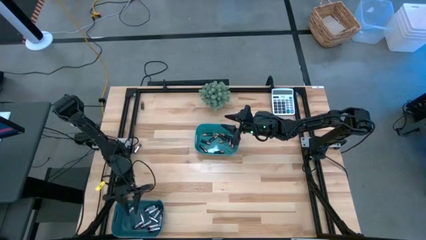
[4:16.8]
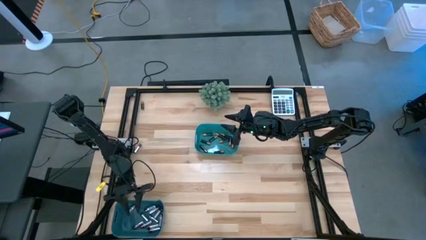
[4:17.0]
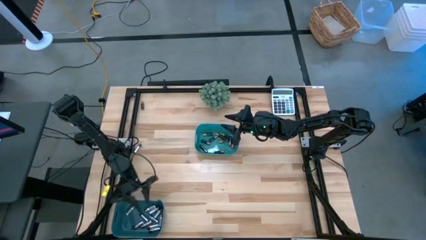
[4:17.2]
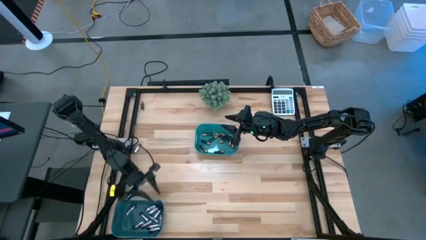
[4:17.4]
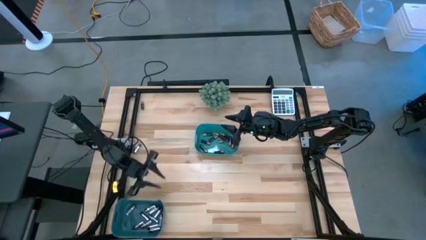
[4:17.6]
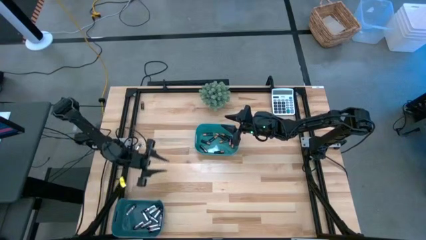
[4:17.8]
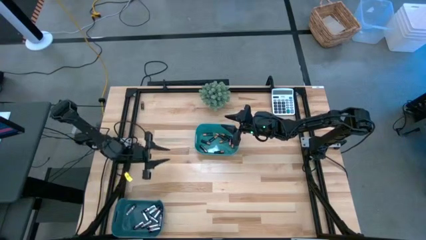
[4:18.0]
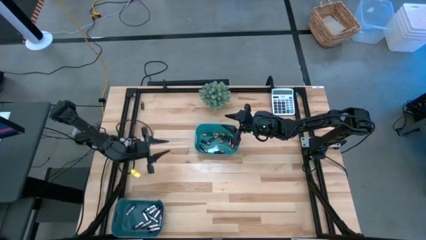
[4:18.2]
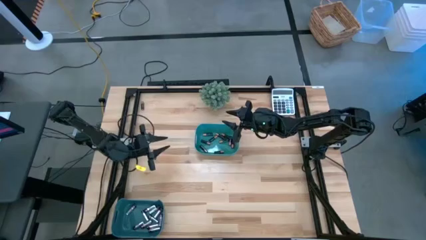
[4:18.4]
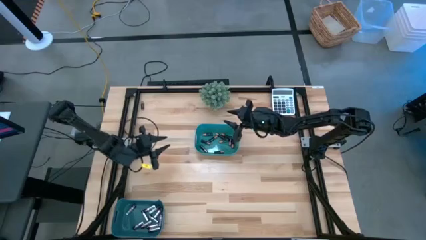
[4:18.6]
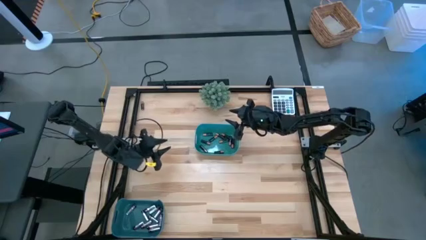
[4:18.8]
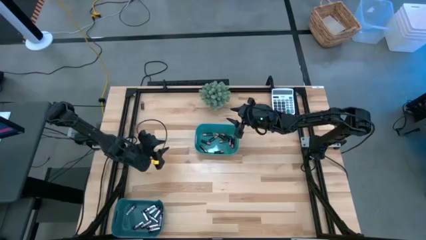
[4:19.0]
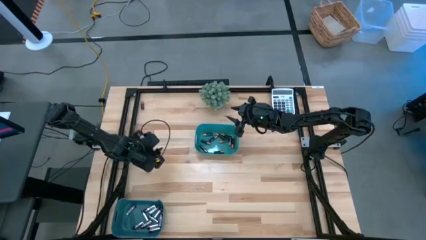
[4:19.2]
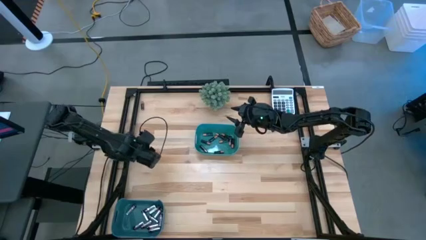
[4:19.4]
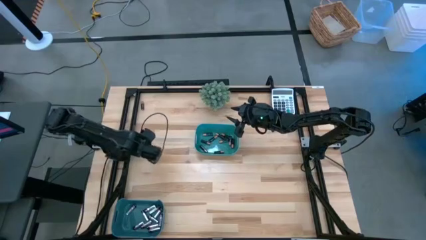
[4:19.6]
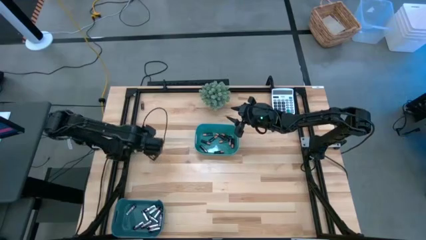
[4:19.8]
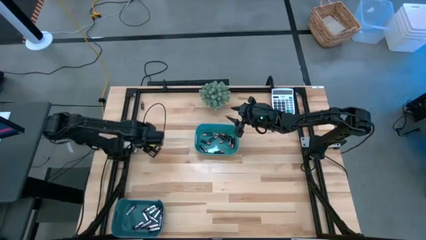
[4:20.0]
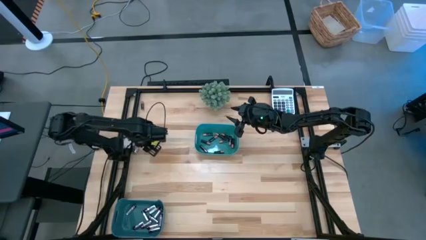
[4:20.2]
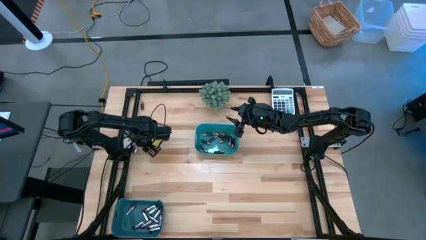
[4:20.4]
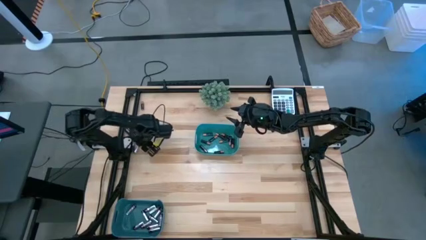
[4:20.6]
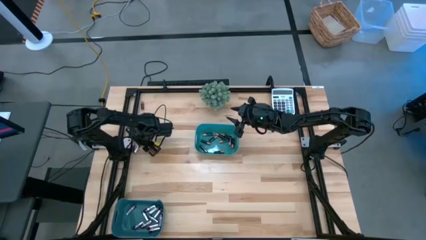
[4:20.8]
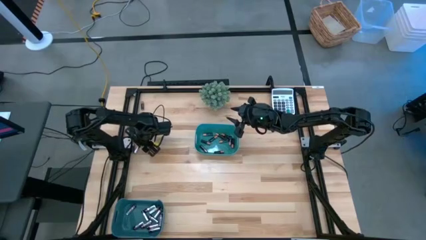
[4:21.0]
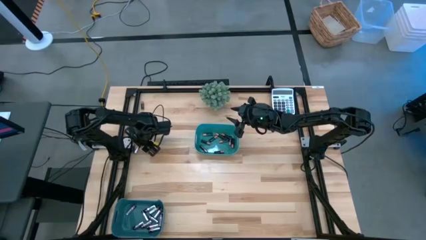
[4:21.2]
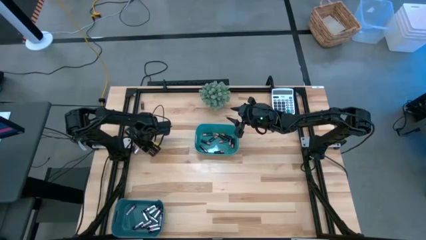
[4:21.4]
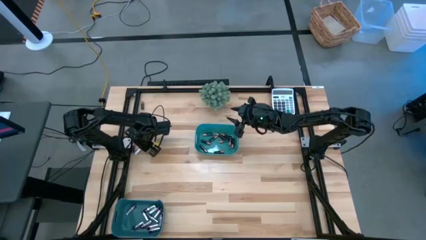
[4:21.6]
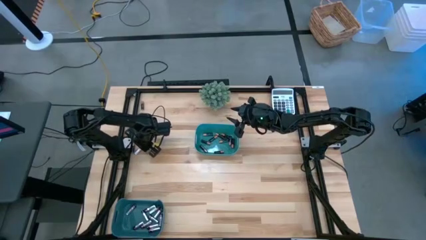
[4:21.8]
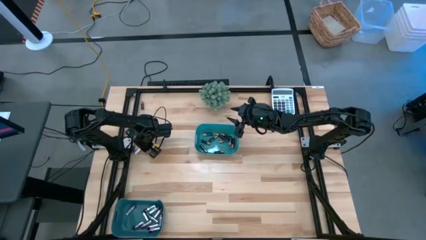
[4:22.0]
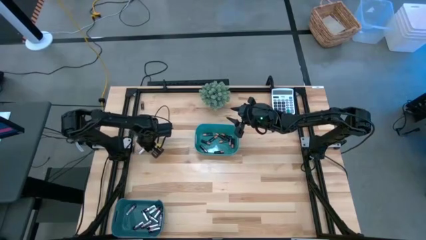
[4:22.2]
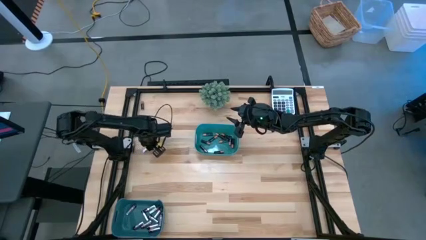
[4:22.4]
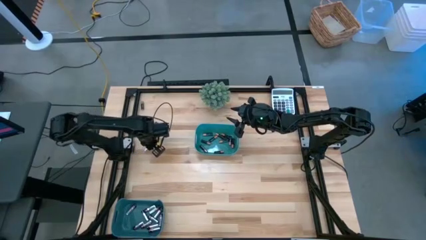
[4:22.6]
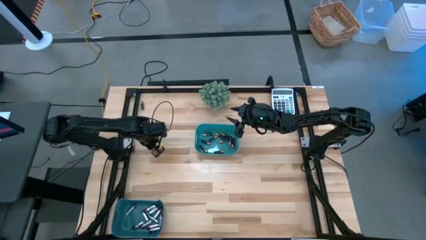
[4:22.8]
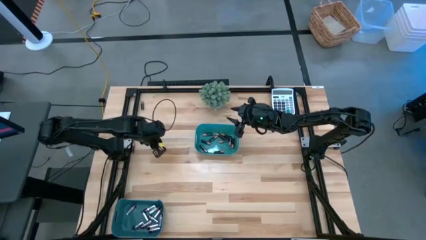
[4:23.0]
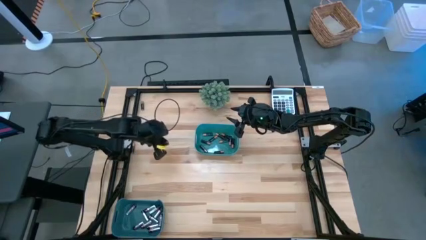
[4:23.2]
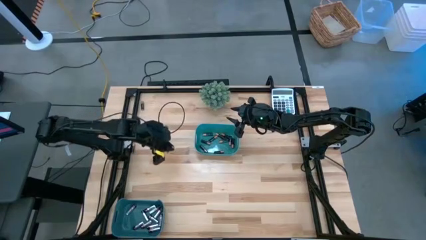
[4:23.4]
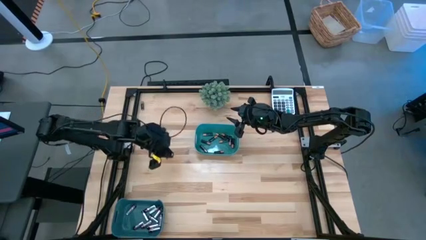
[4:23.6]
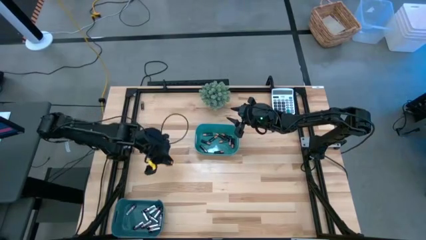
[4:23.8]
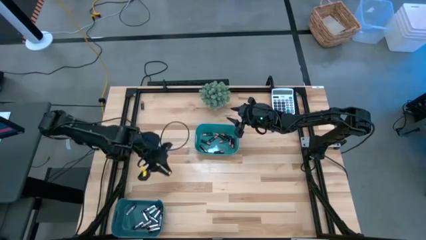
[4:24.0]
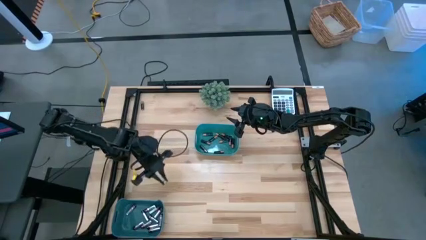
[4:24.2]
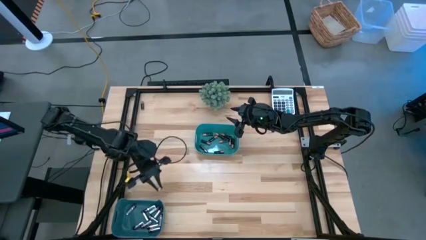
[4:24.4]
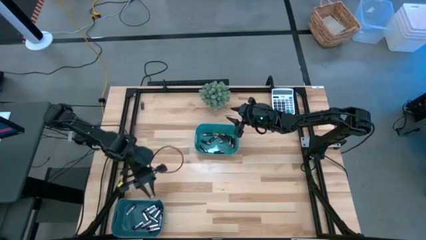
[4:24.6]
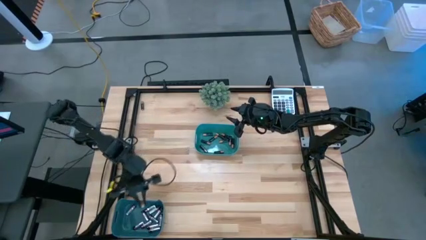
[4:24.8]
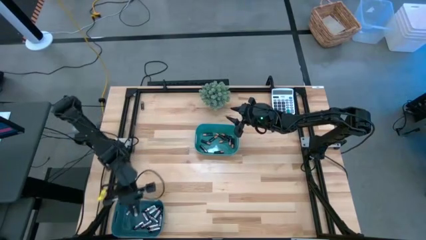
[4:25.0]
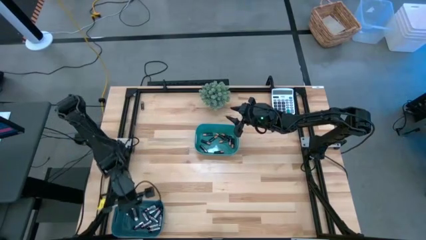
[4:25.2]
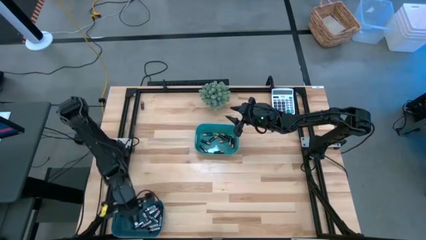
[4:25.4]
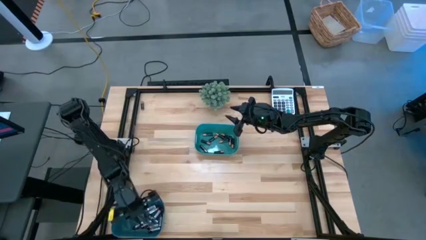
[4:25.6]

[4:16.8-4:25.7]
Task: Sort batteries
Put the silver battery into the blue bin

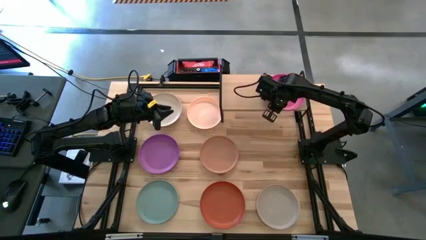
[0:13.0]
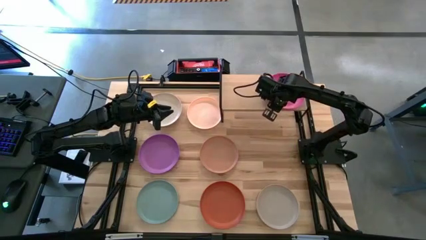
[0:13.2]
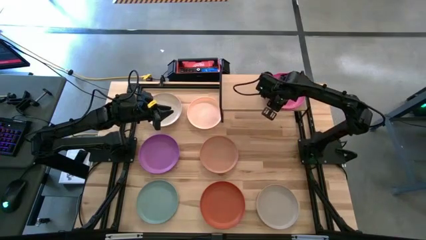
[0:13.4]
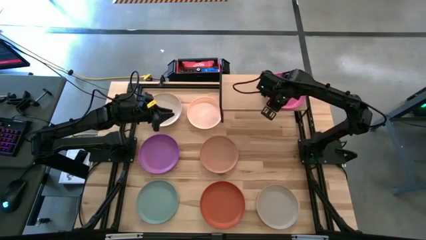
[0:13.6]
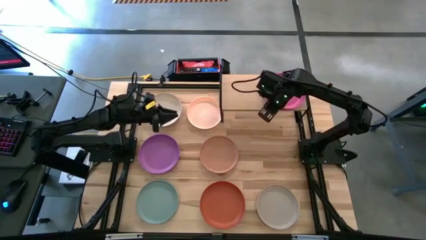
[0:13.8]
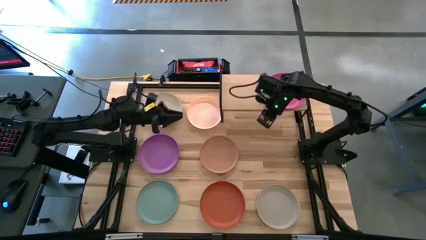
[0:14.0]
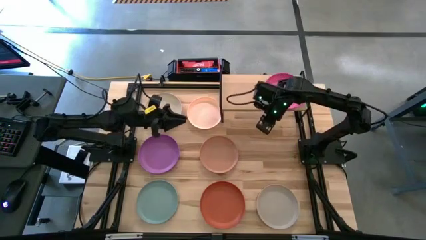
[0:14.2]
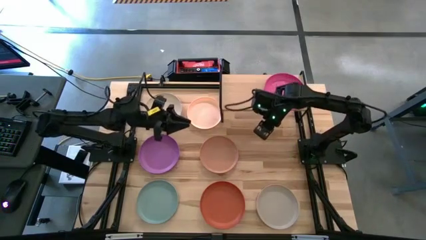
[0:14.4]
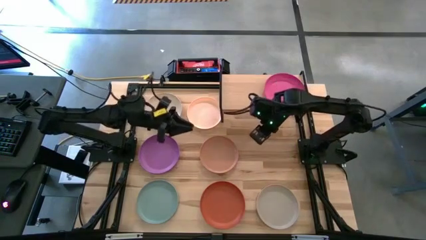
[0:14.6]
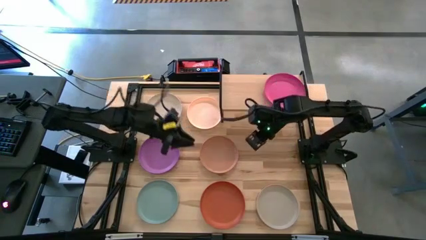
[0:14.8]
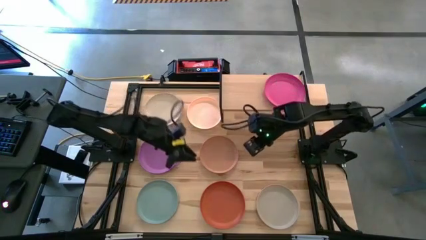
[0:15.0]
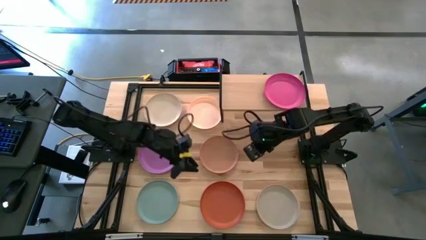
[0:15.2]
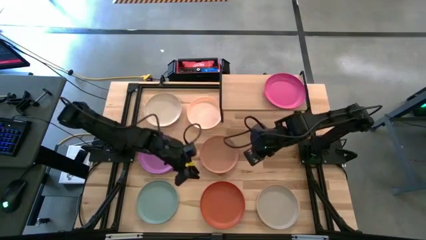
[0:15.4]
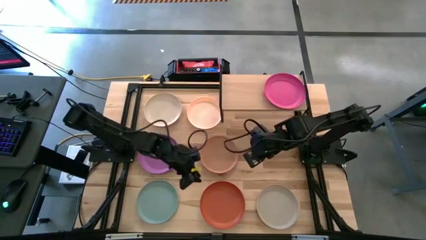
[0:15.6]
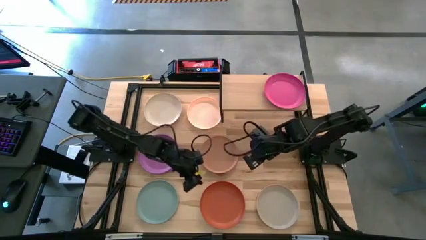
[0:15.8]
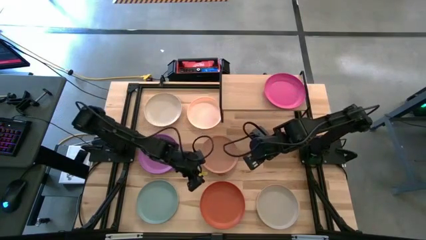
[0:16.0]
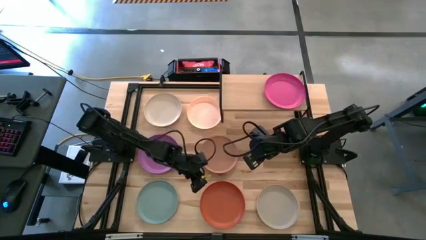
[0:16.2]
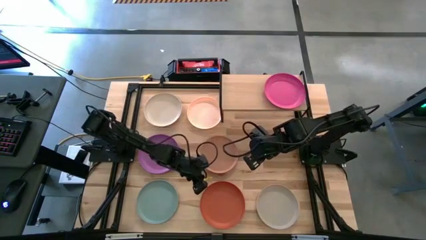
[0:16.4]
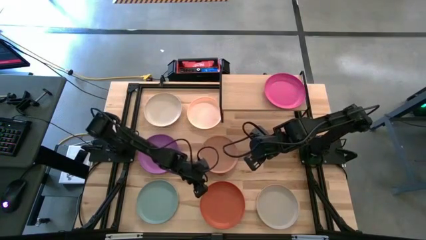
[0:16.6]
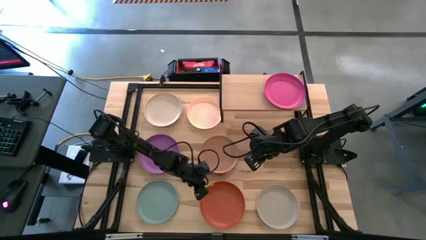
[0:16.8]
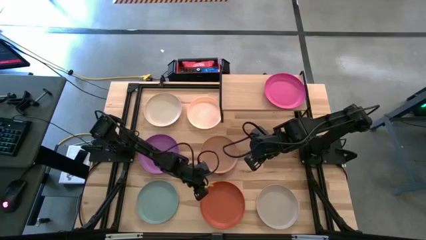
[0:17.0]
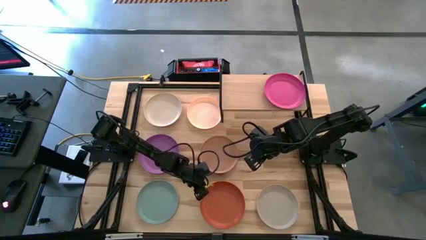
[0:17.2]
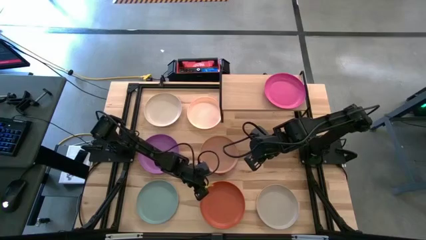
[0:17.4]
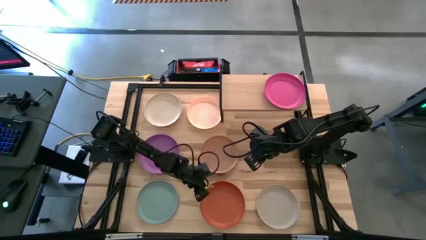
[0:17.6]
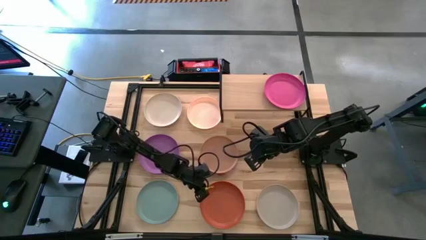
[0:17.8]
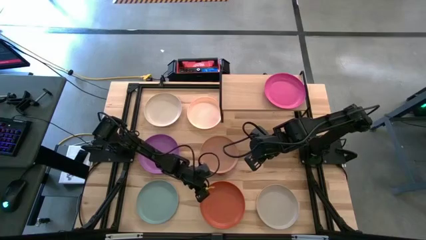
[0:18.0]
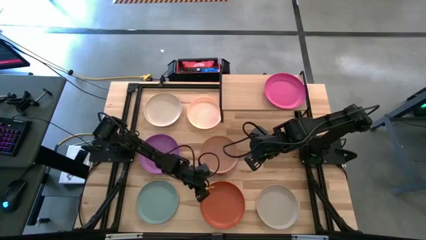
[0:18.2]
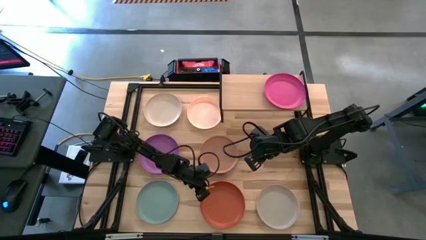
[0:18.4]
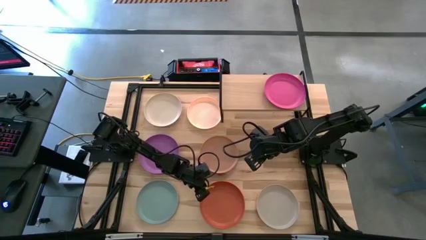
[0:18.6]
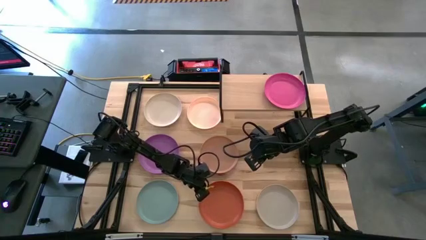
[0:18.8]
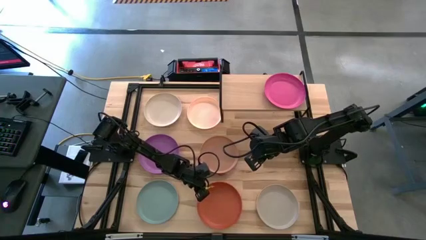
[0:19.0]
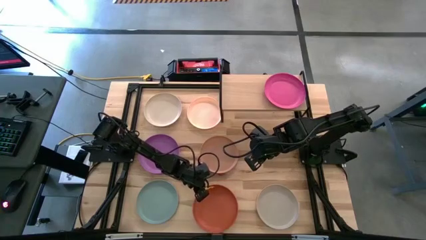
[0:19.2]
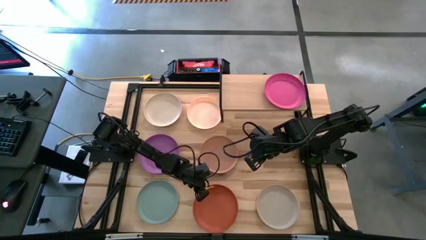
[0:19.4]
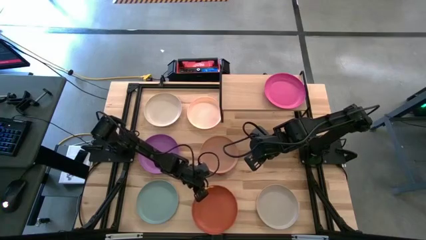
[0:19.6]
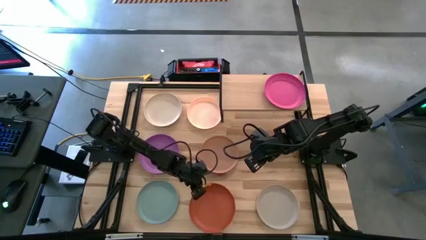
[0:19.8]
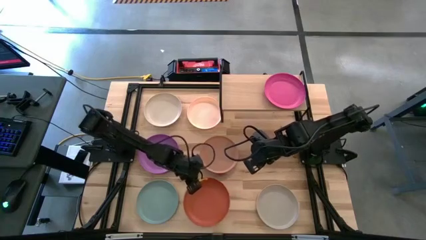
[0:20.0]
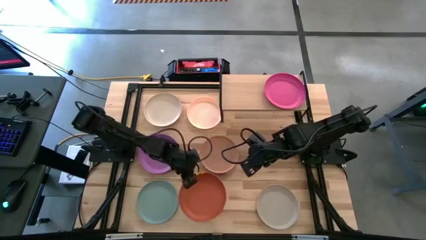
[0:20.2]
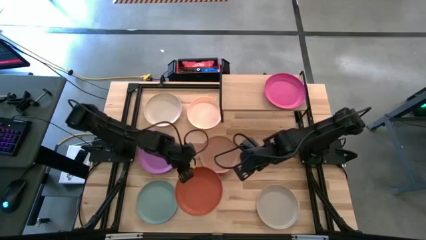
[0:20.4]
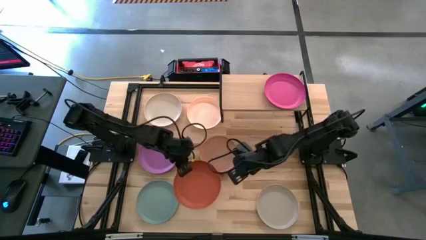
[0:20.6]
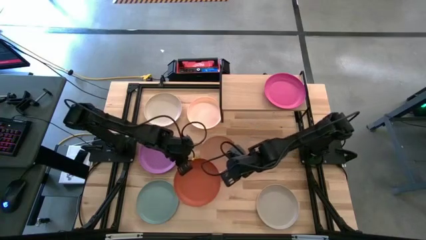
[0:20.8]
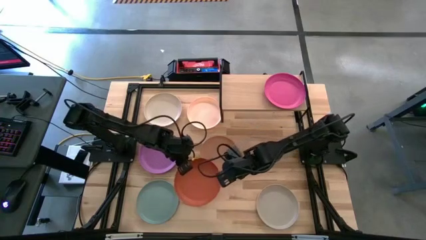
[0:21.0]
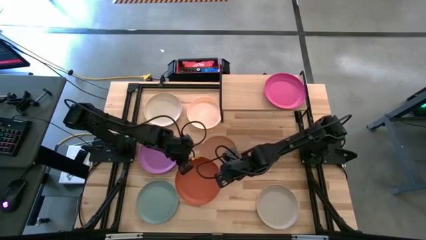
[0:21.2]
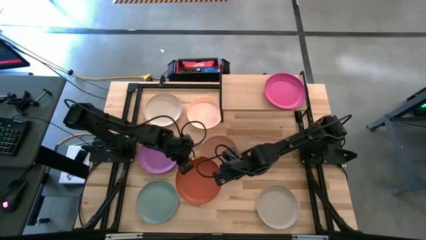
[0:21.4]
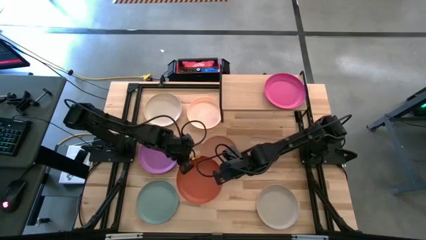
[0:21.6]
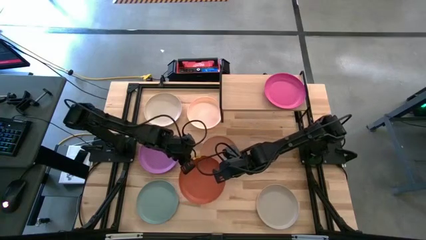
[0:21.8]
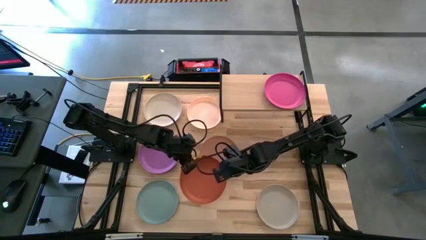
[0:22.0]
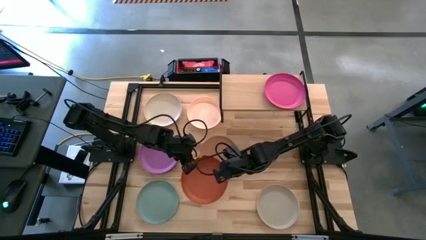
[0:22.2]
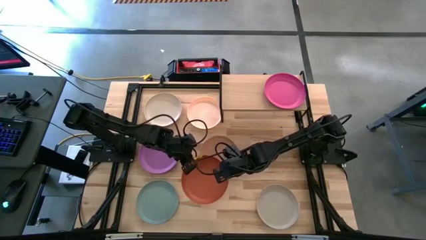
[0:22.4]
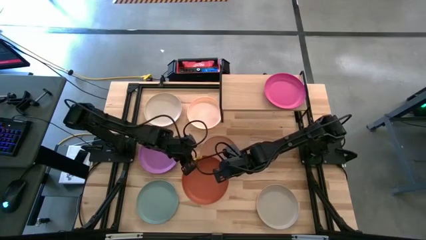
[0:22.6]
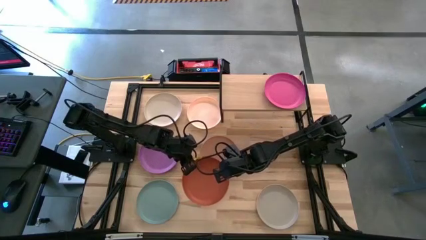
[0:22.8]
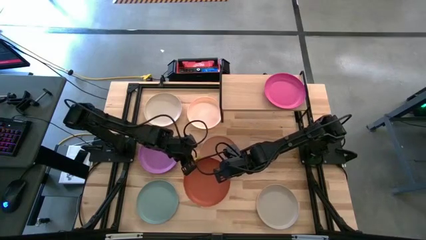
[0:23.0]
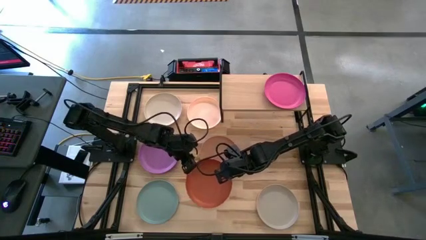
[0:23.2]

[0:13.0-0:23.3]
Task: Place and stack plates onto a shelf
Stack the orange plate on top of the pink plate
